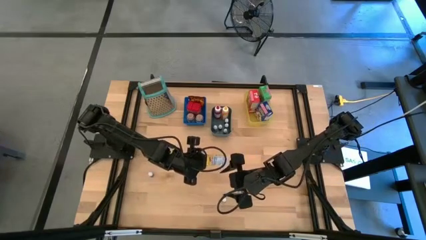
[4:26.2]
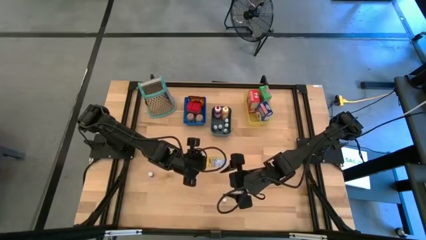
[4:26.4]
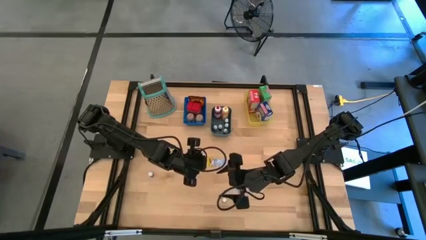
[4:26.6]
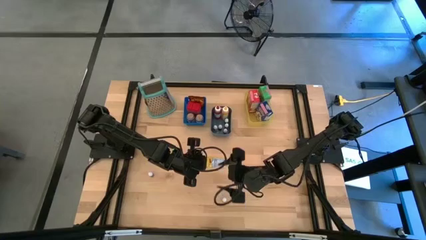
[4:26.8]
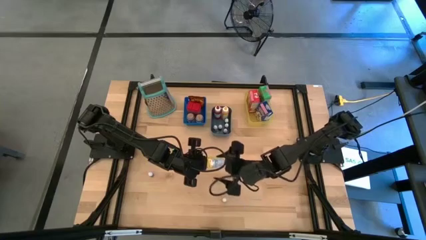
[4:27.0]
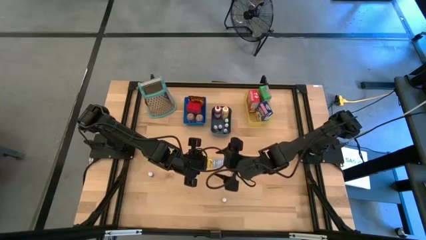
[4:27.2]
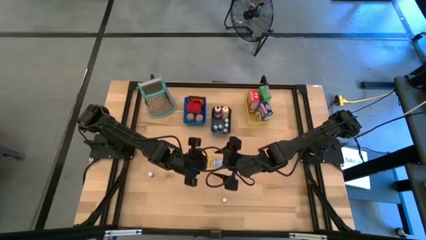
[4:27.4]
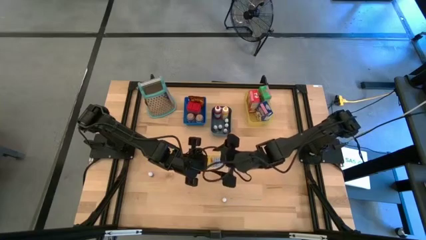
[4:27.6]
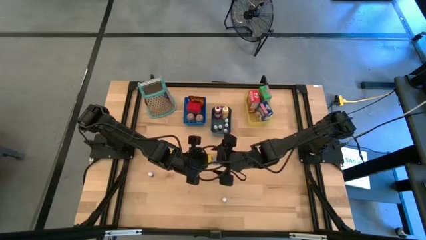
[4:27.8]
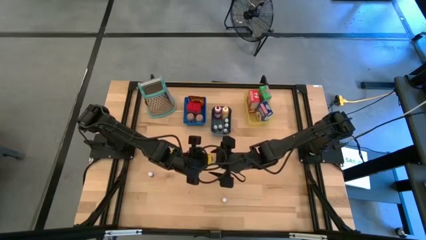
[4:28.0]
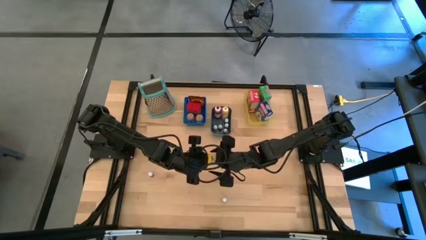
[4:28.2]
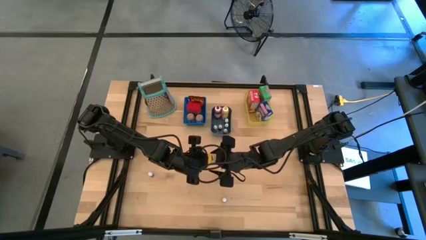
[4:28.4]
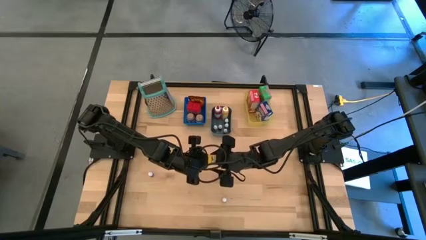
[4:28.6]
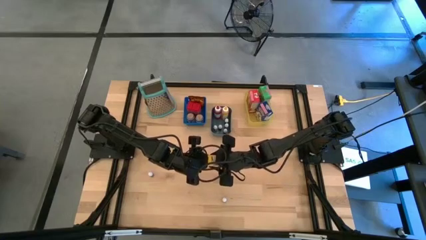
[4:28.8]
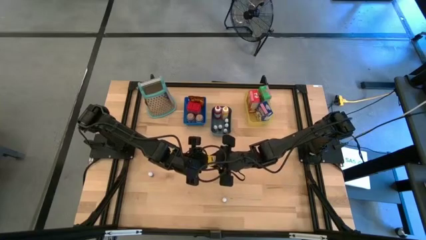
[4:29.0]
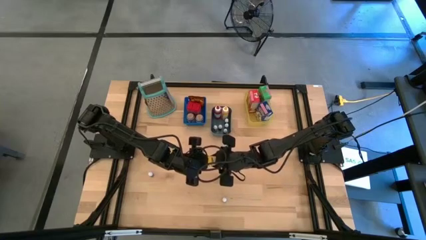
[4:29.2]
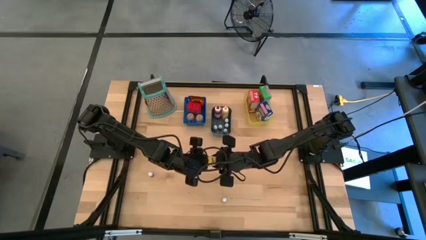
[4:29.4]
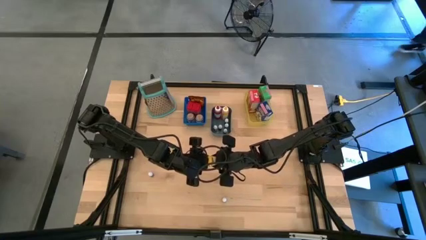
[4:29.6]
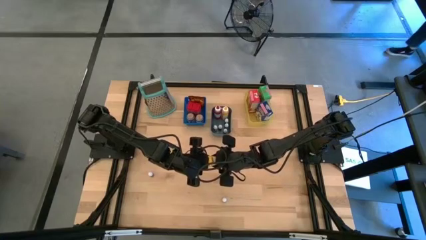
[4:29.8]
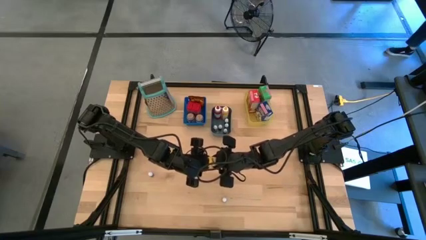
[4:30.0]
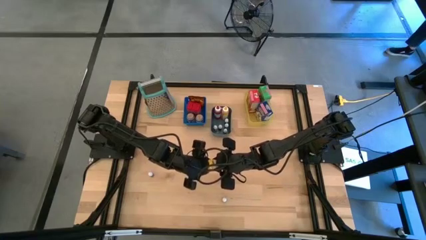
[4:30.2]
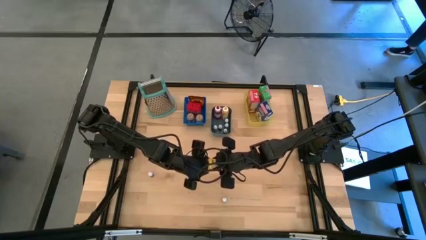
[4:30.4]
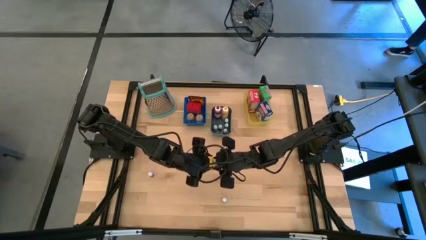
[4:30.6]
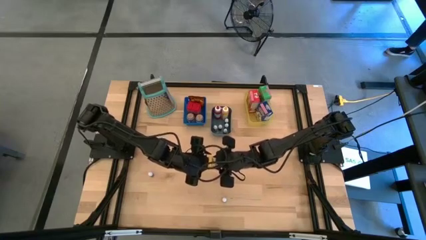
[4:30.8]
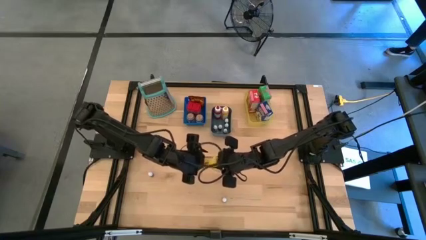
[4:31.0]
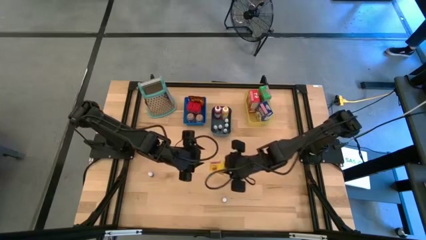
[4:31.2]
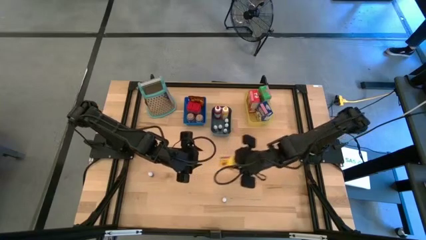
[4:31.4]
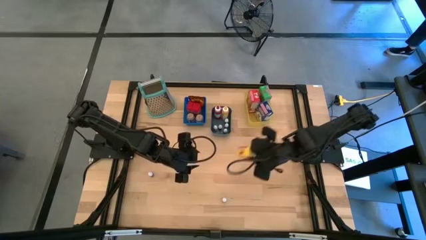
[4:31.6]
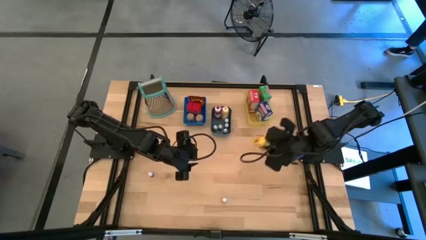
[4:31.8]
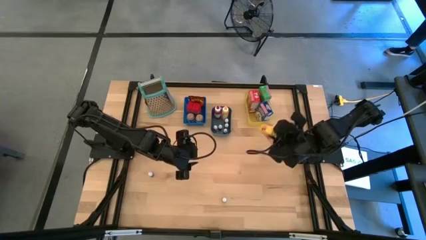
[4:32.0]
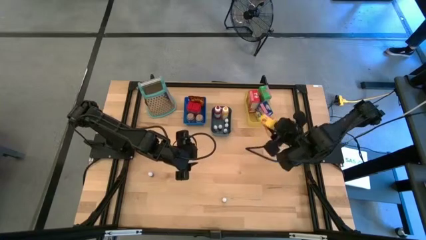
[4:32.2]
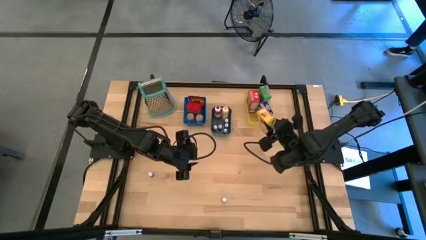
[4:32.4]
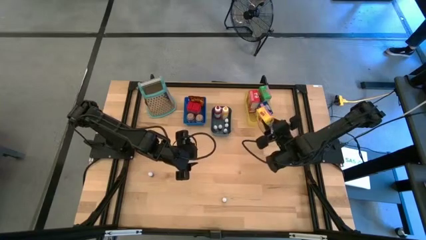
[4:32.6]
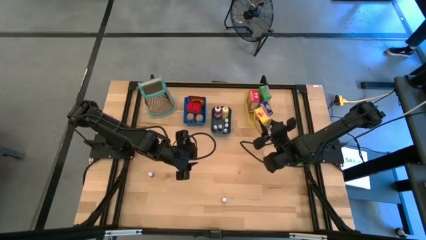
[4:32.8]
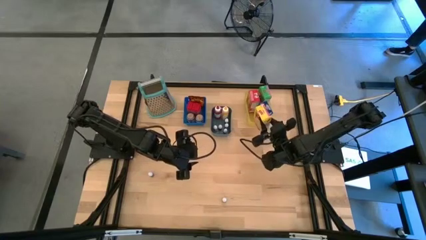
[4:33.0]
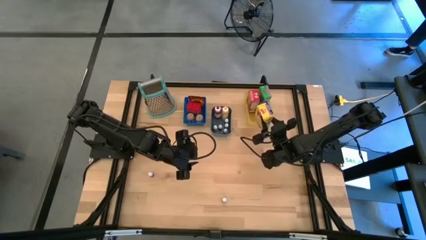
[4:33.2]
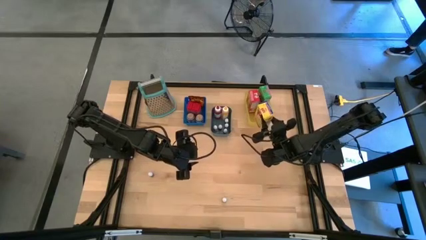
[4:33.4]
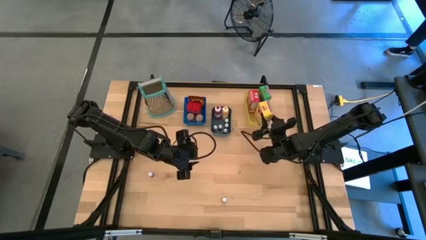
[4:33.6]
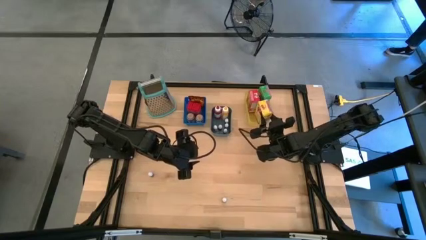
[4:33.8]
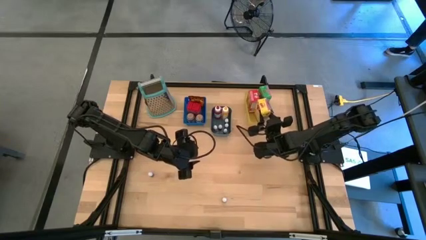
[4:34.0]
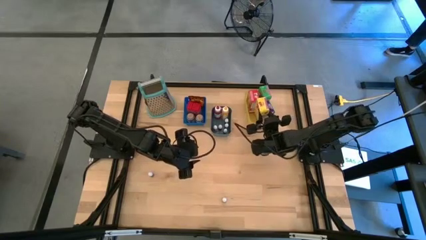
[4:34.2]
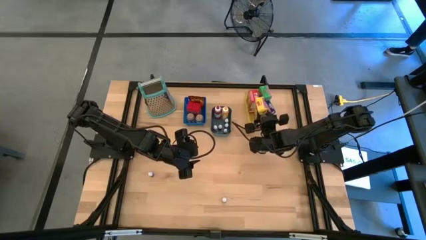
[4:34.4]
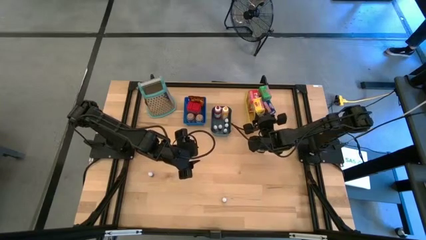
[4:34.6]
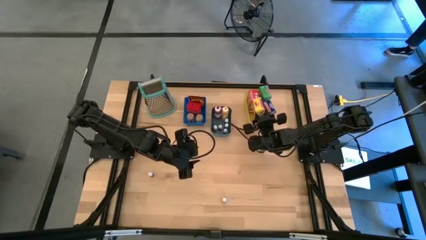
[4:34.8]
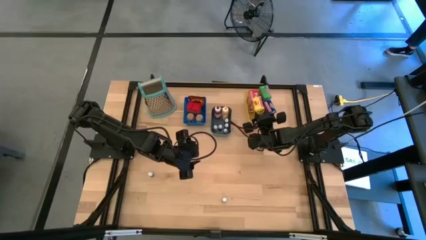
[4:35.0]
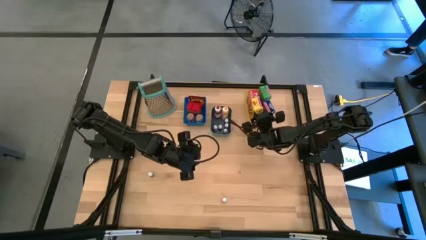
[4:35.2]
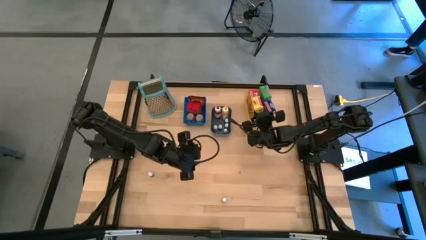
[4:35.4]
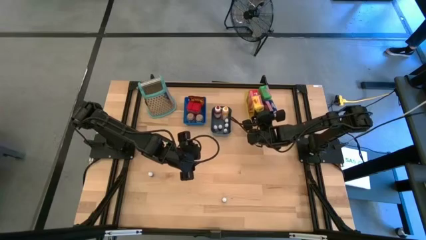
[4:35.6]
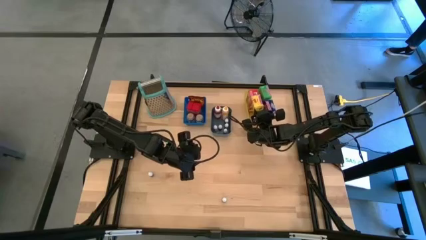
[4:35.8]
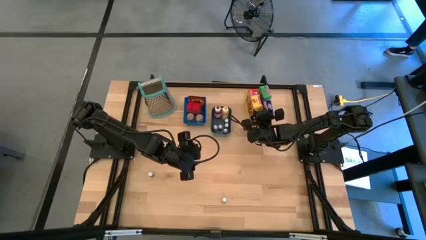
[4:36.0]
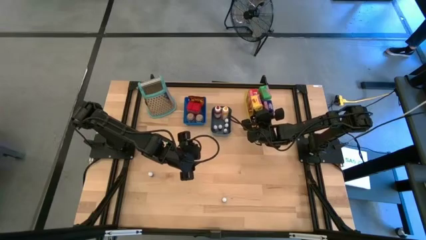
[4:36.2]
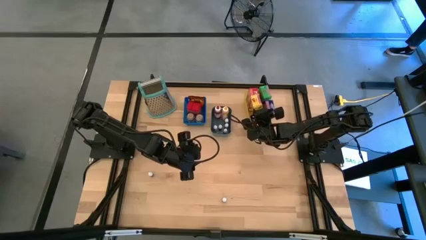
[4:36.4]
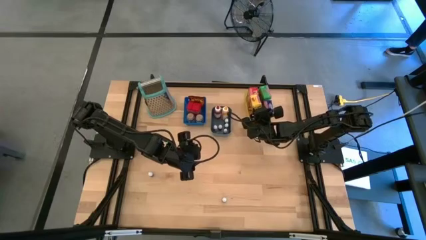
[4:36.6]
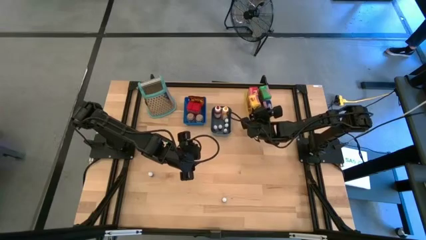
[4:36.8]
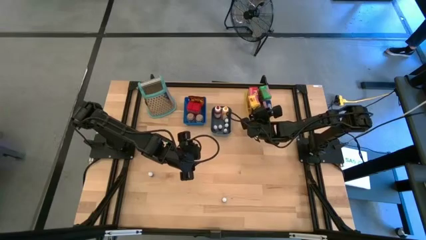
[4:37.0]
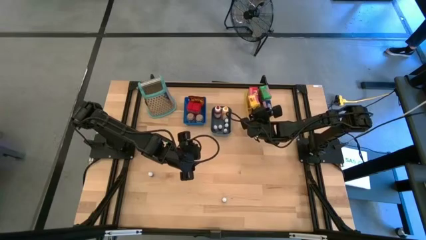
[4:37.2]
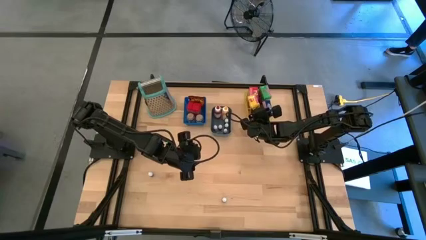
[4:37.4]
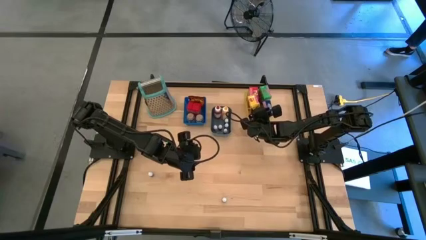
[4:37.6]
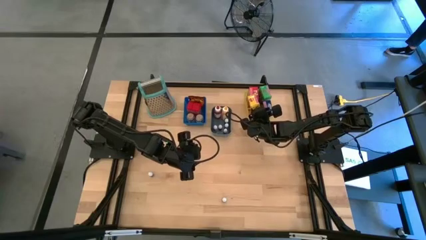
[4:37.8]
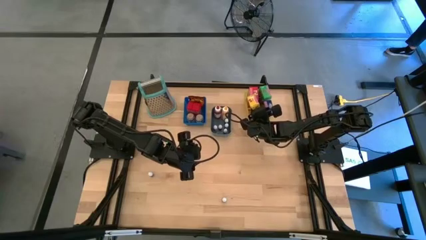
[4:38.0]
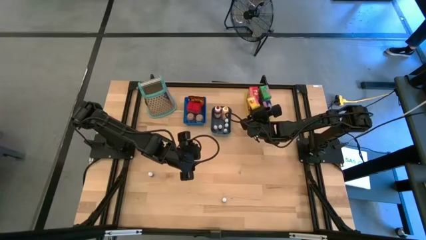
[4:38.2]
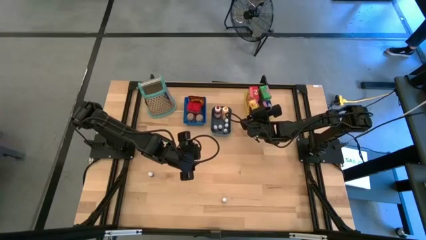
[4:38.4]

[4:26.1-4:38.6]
Task: Pick & Place Kitchen Items
Put the yellow cereal box into the yellow bin

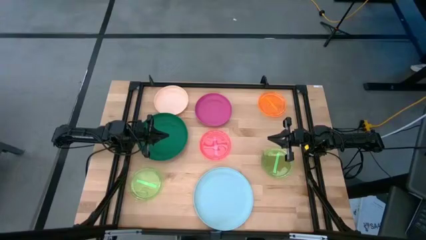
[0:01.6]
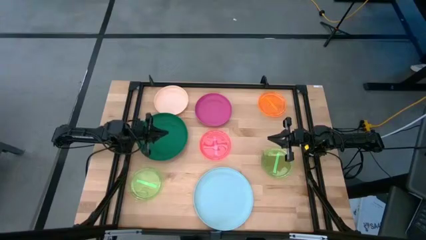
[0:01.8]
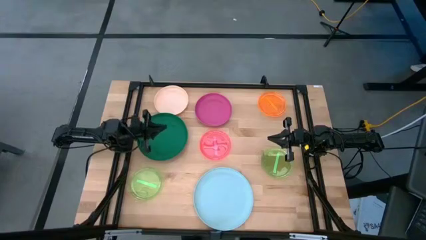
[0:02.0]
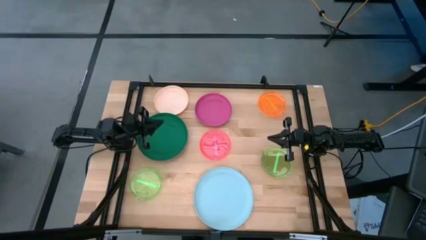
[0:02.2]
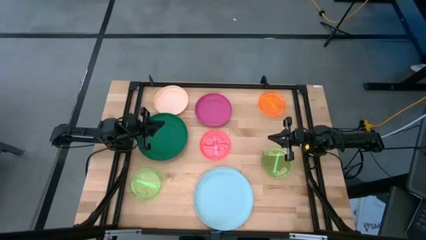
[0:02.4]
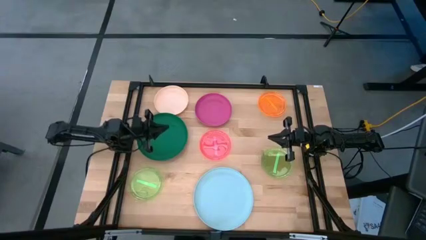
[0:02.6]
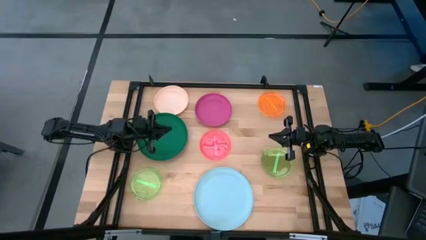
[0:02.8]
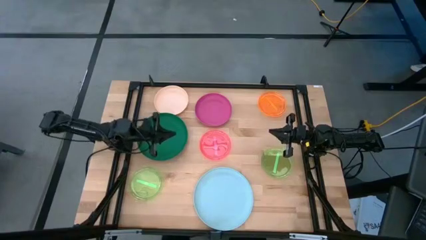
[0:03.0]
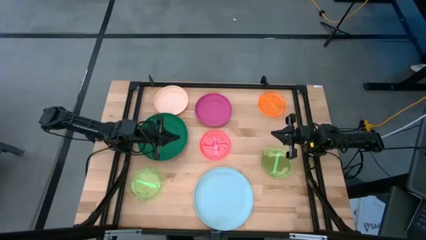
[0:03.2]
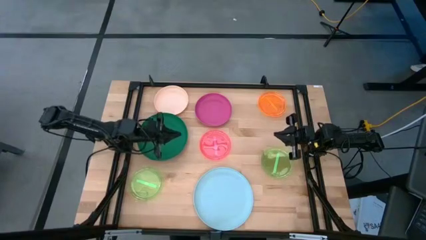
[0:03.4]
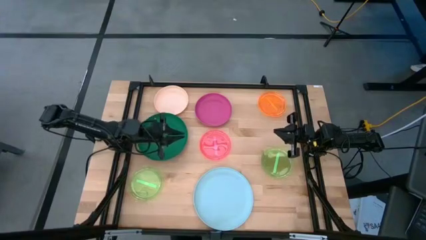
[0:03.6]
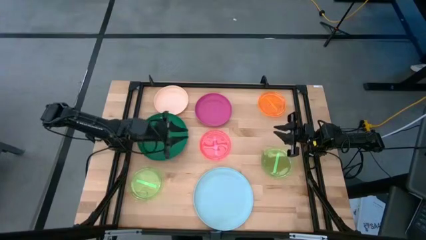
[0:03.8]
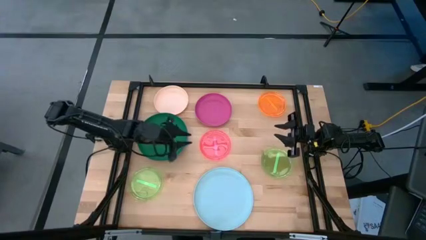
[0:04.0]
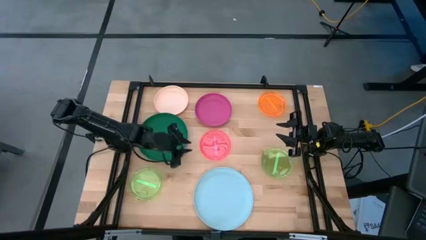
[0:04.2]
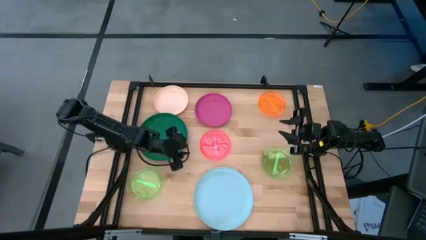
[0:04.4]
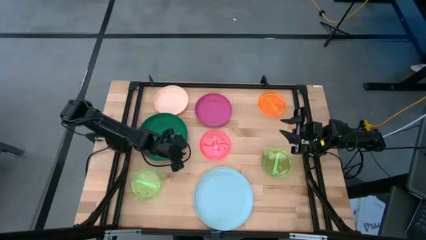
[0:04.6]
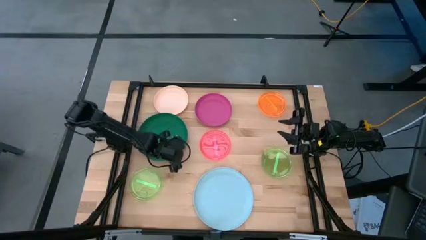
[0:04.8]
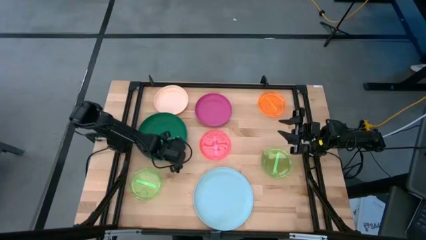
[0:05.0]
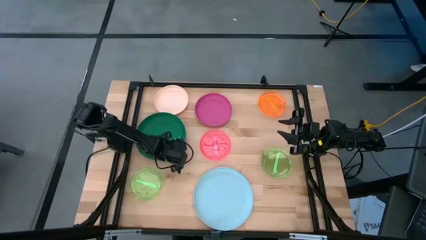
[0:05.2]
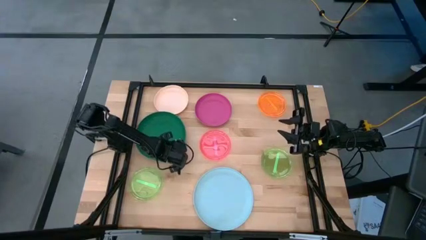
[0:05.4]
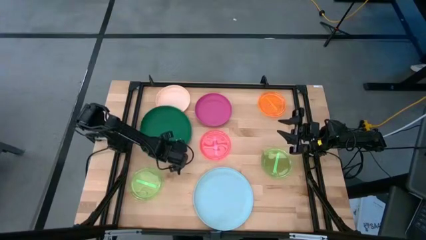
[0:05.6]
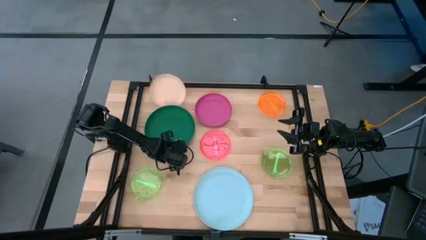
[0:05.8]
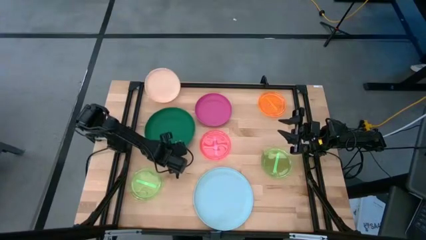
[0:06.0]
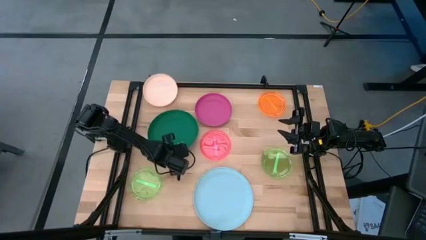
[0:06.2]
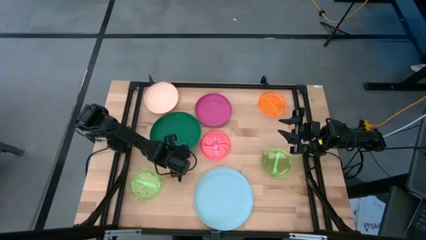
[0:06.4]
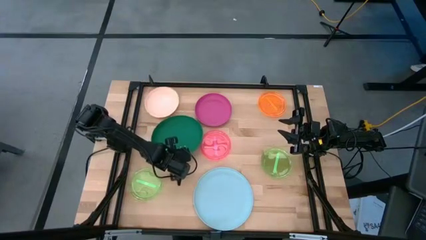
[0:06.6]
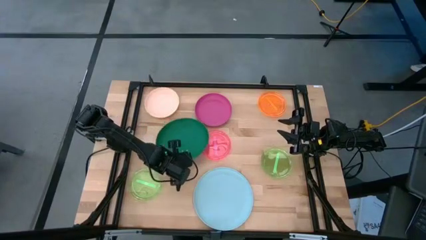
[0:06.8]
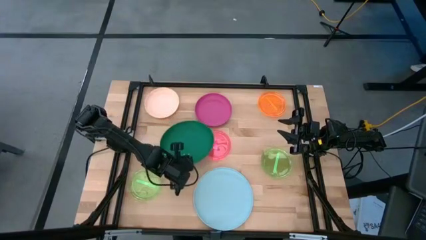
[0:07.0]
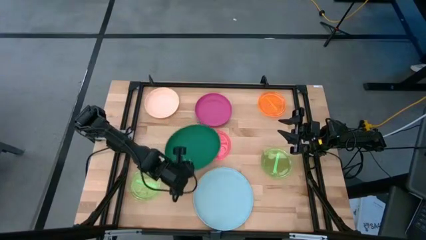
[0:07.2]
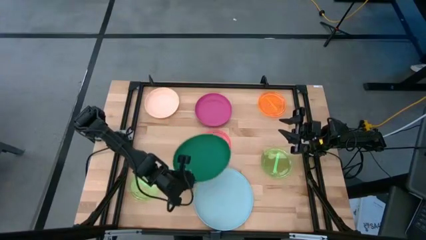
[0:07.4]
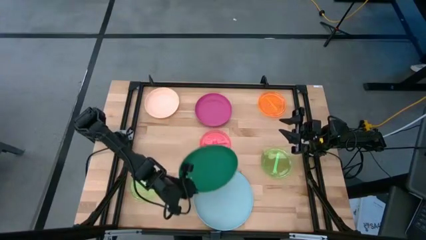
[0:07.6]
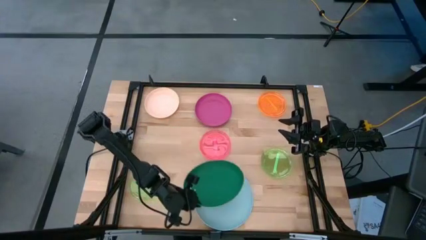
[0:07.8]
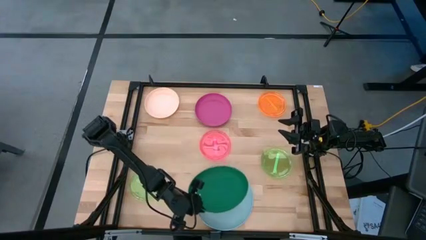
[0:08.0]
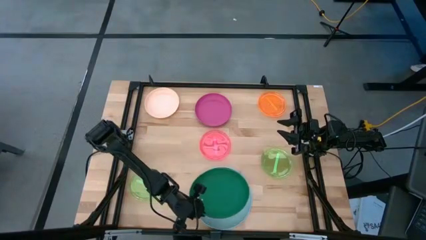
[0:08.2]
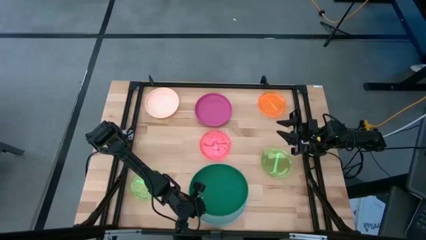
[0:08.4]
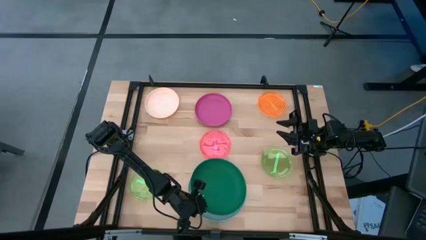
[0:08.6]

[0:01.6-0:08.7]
Task: Stack plastic plates
Stack the green plate on the blue plate
